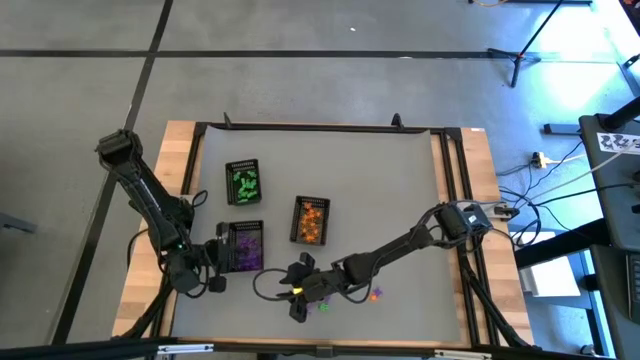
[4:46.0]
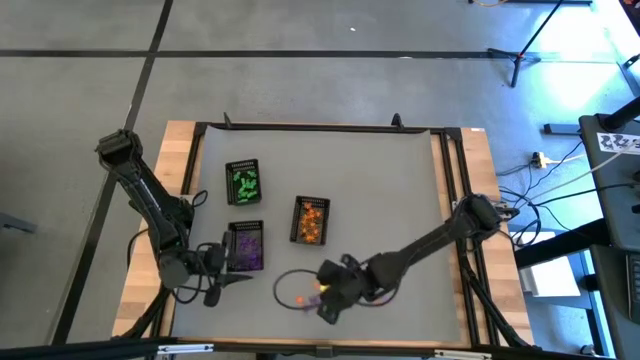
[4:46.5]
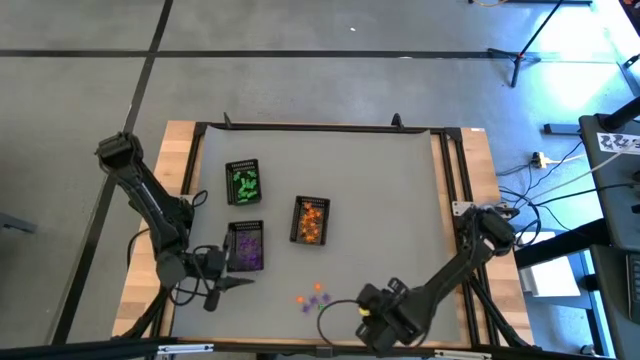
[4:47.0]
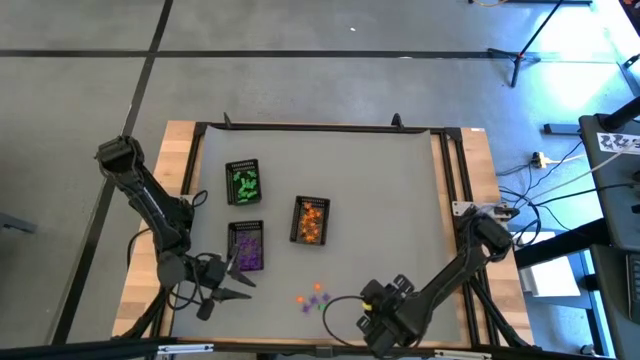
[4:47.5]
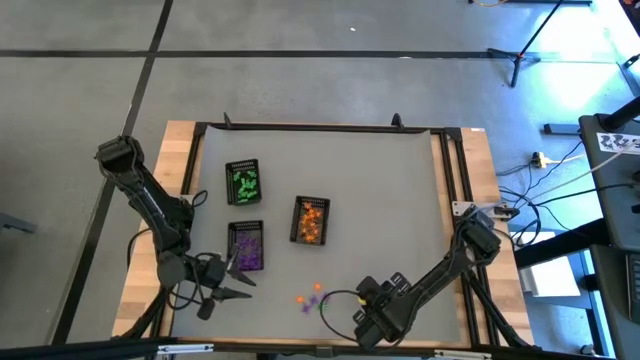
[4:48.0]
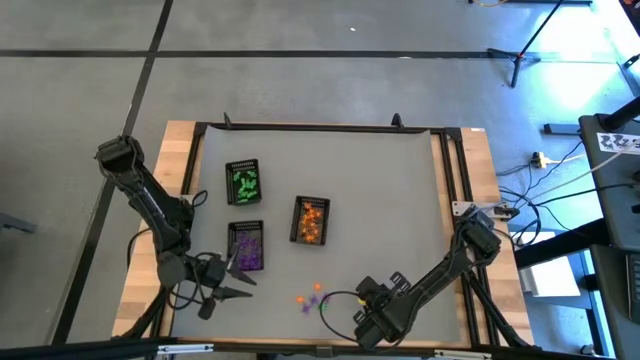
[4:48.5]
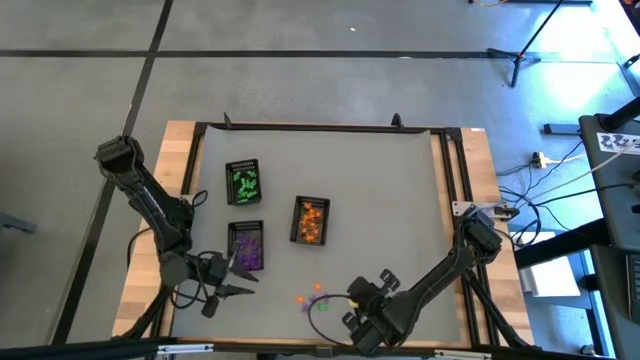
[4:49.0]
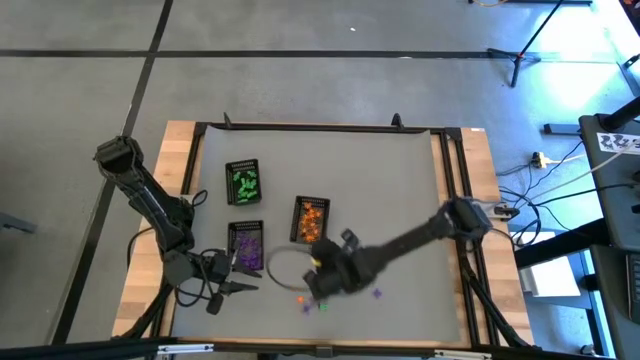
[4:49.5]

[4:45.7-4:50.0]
Task: Sort Halloween decoration
Put the orange spider toy into the bottom right black basket

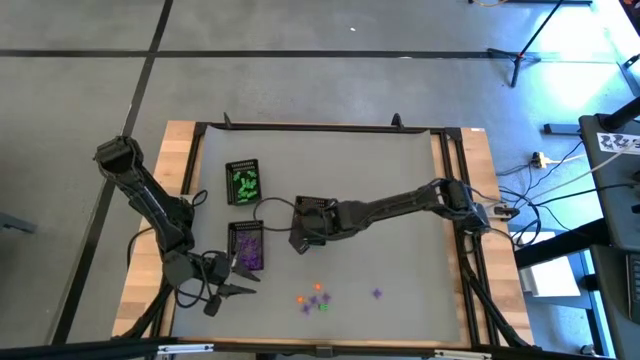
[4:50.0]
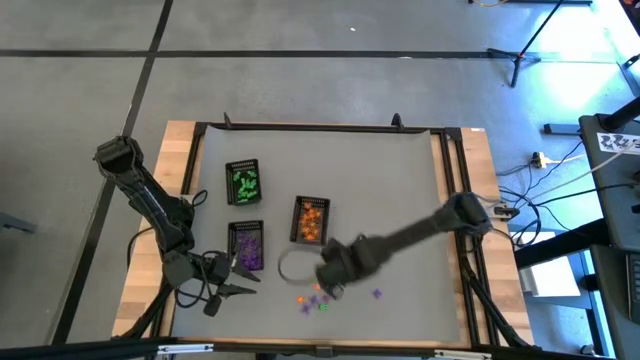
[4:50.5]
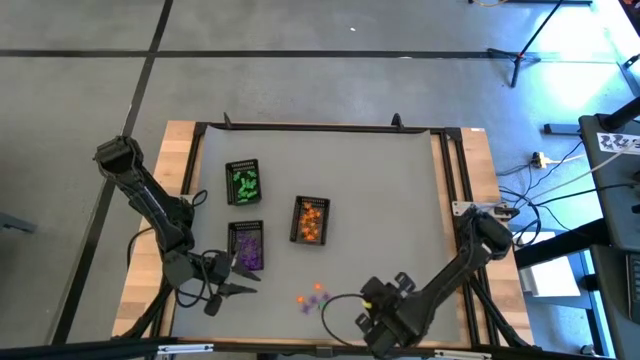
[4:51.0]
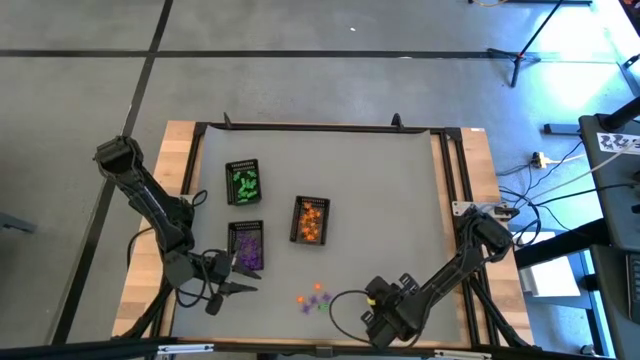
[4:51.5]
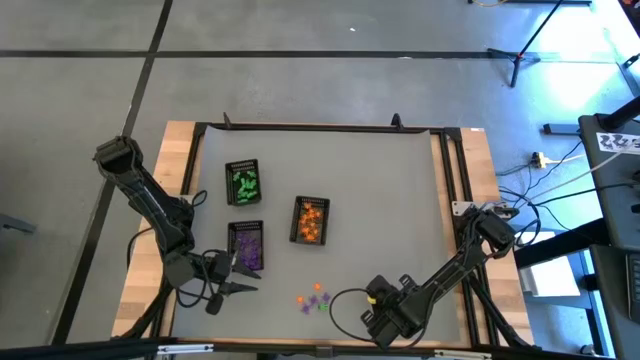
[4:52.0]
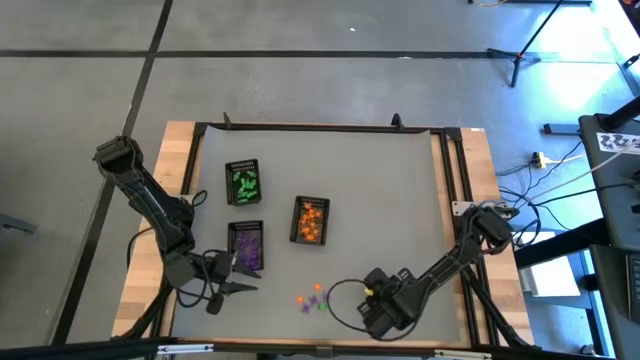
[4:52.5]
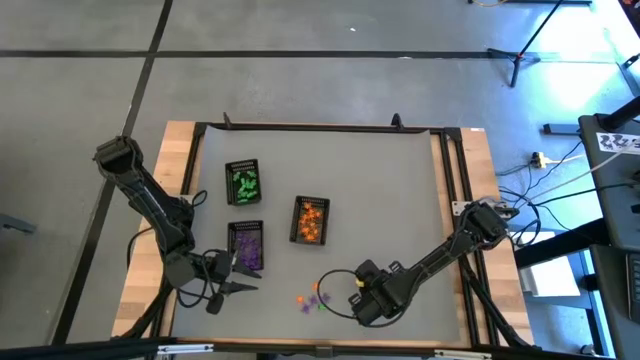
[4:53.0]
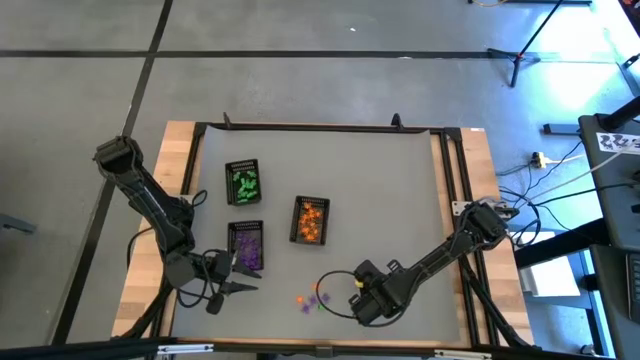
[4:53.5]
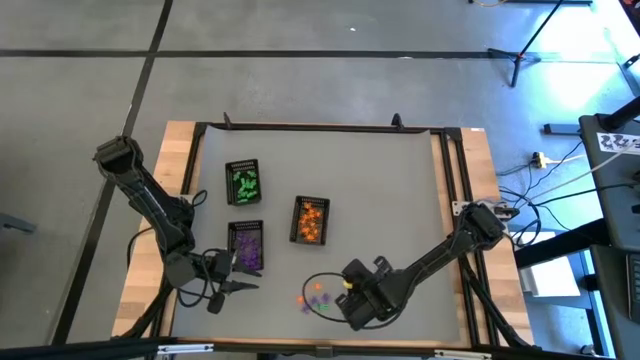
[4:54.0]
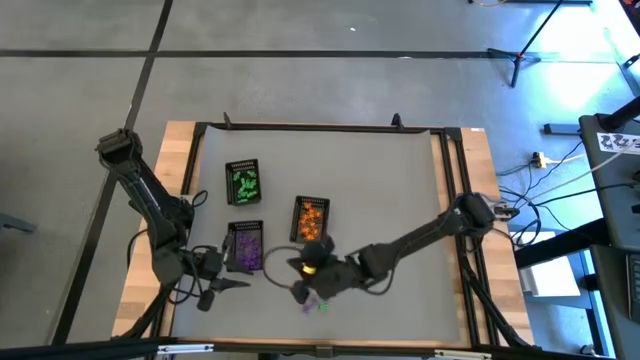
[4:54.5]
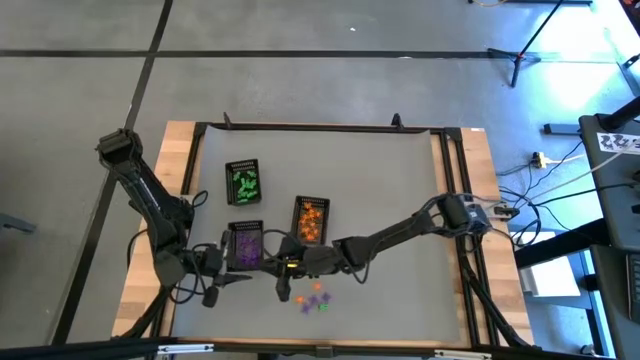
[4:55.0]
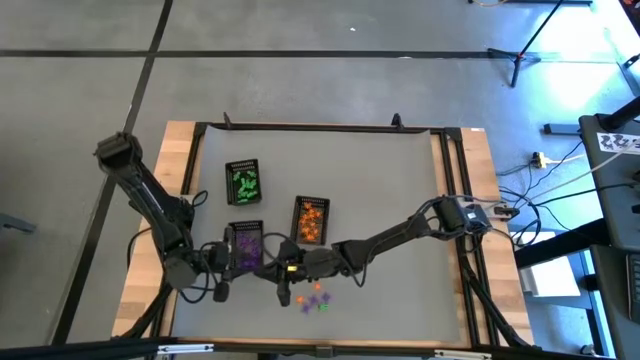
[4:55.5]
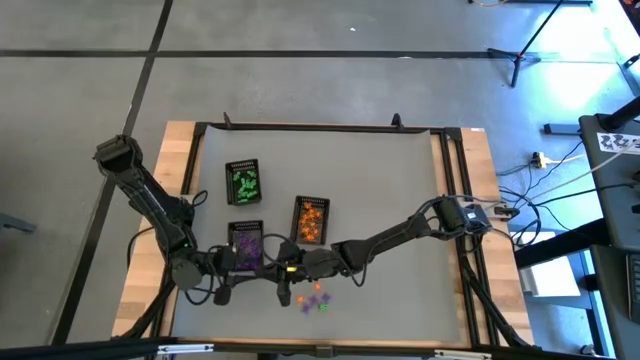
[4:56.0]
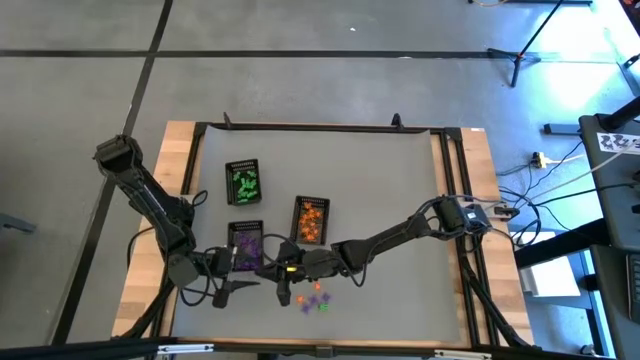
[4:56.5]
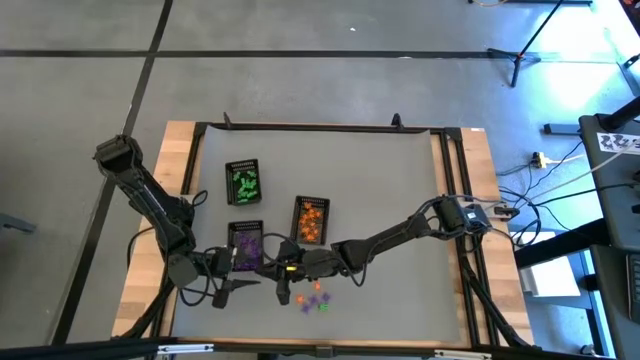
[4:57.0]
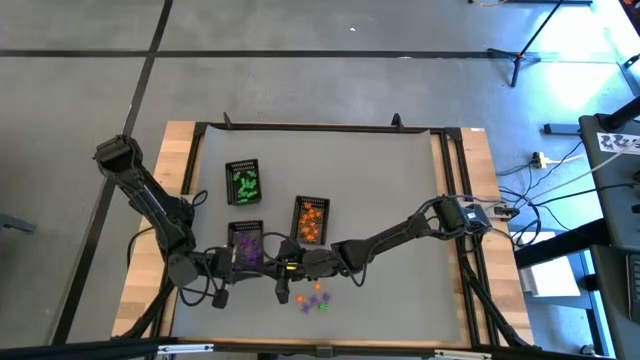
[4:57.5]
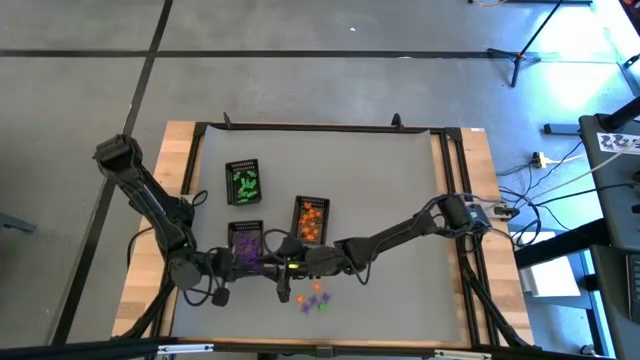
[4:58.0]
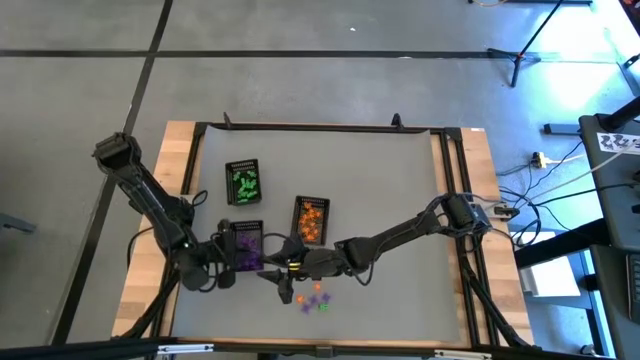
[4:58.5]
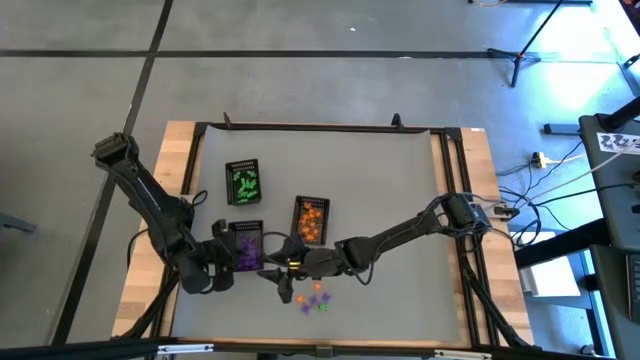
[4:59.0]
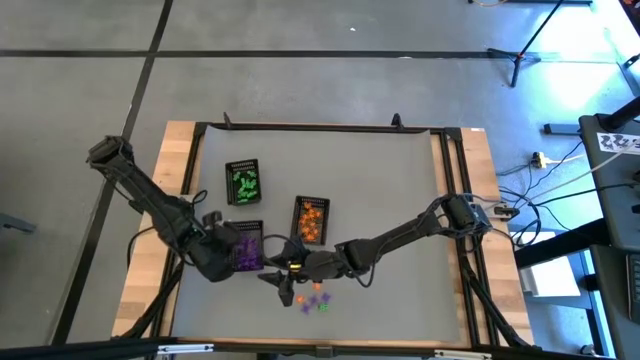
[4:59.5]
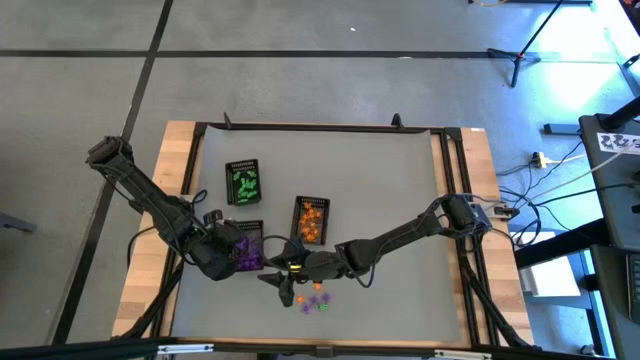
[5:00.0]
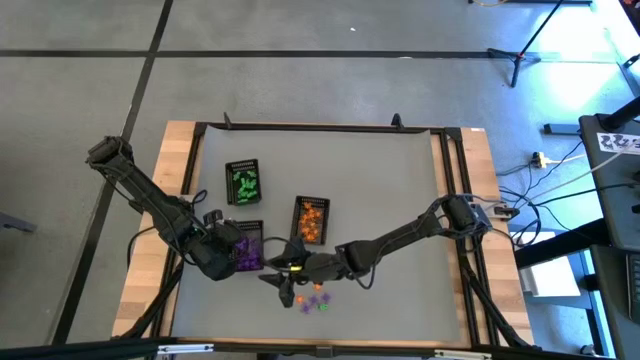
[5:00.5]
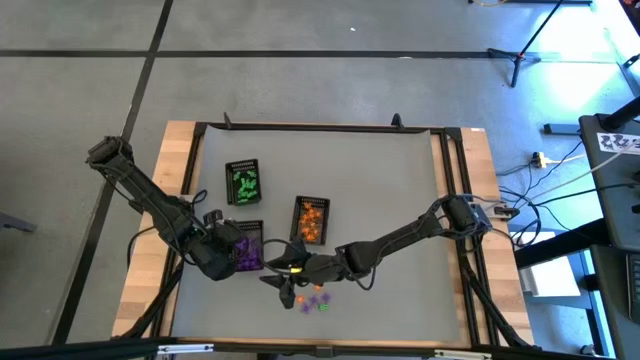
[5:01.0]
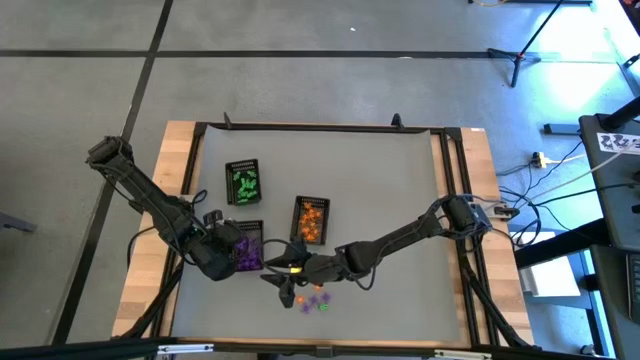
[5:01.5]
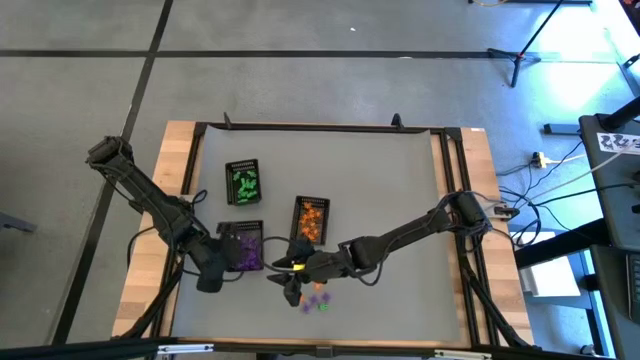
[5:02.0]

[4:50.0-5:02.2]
Put the purple spider toy into the bottom left black basket

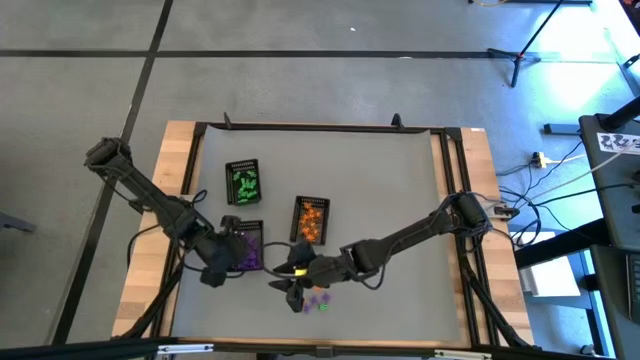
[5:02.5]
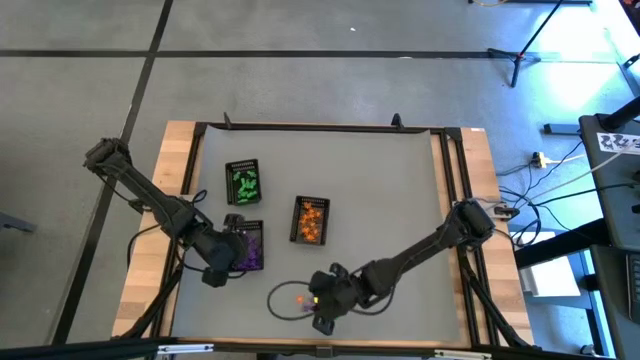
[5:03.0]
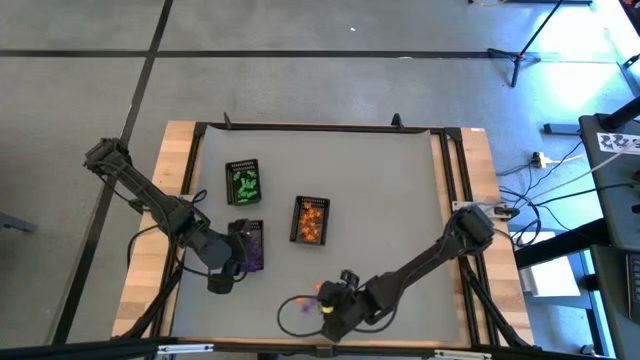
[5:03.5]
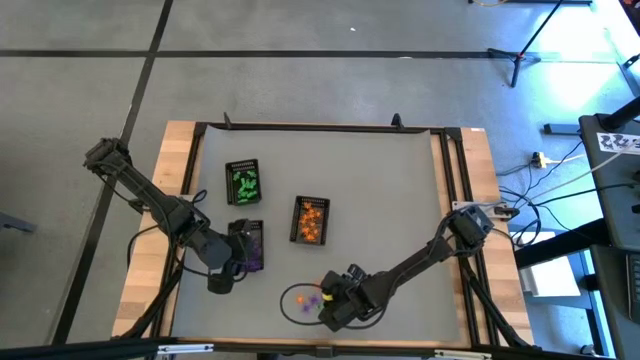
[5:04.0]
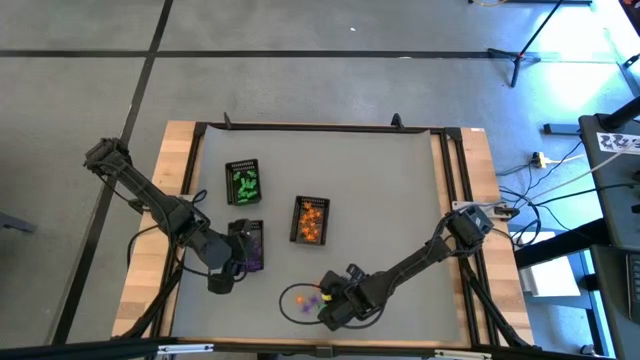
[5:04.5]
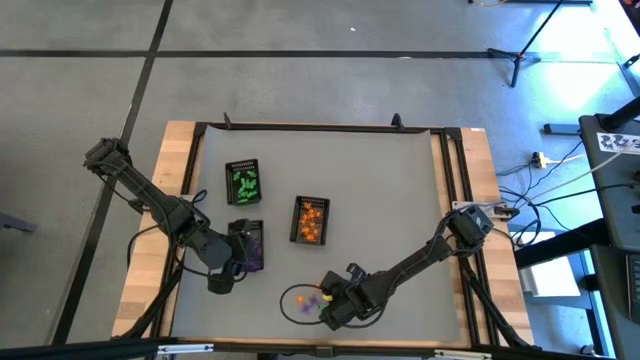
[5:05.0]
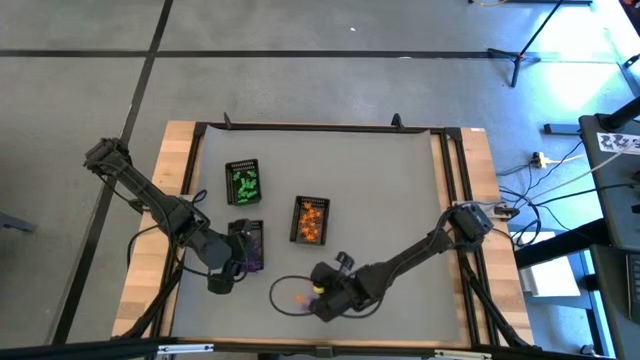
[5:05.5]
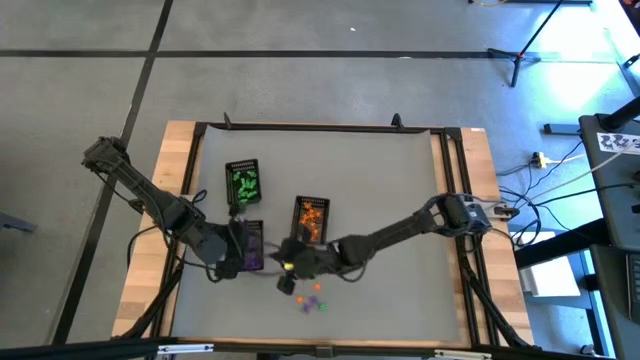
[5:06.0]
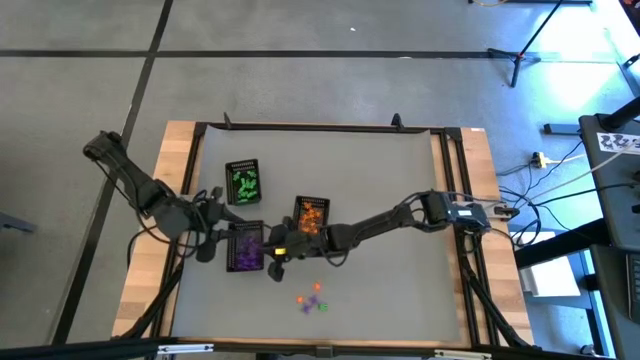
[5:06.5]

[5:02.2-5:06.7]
Put the purple spider toy into the bottom left black basket

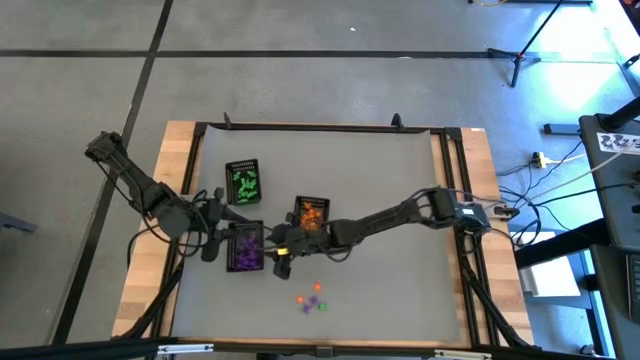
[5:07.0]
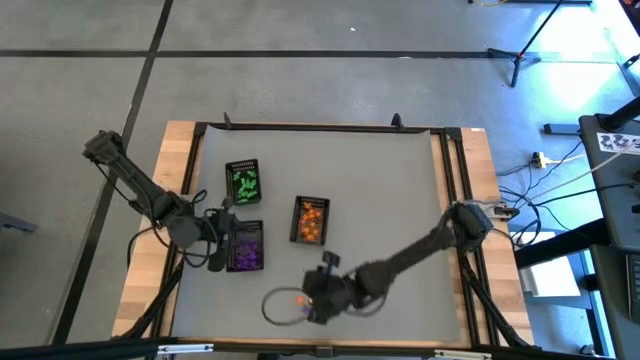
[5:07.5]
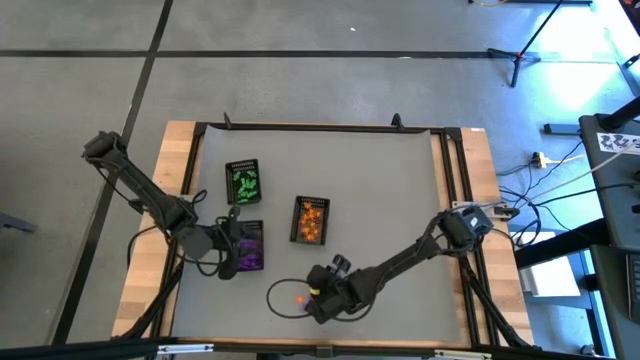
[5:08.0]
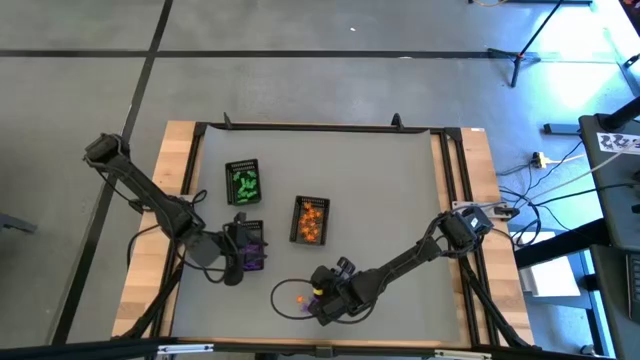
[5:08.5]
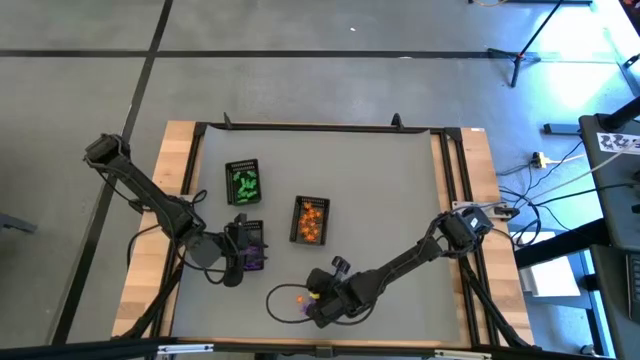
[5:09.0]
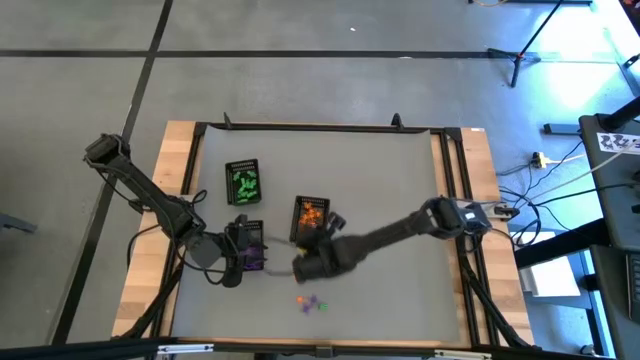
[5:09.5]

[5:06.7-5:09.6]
Put the orange spider toy into the bottom right black basket
